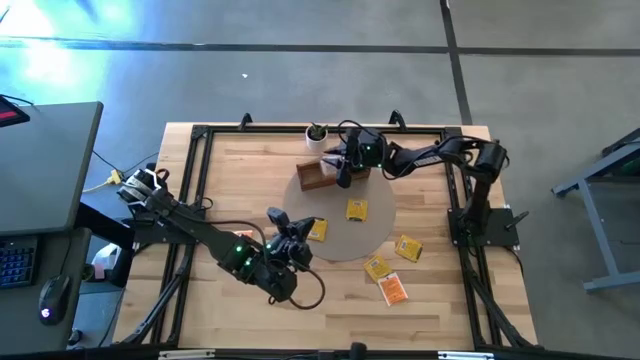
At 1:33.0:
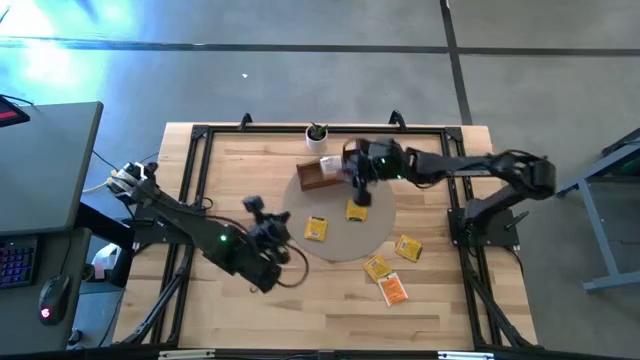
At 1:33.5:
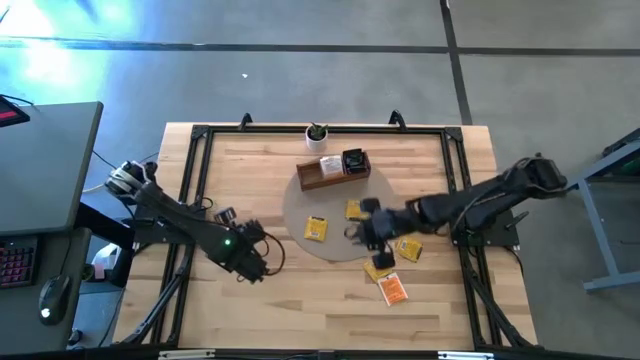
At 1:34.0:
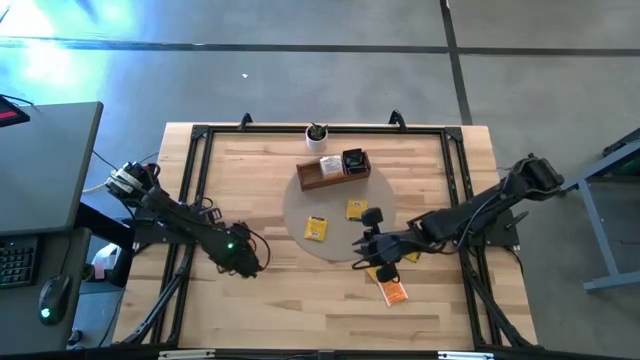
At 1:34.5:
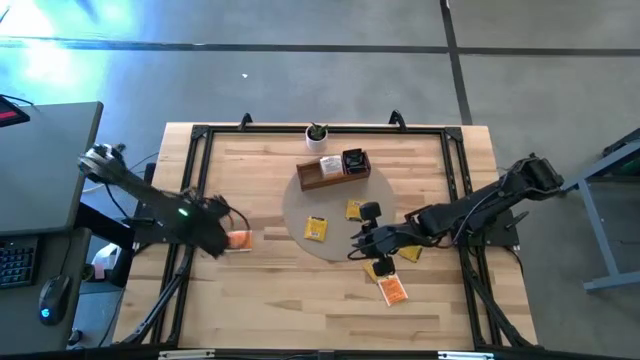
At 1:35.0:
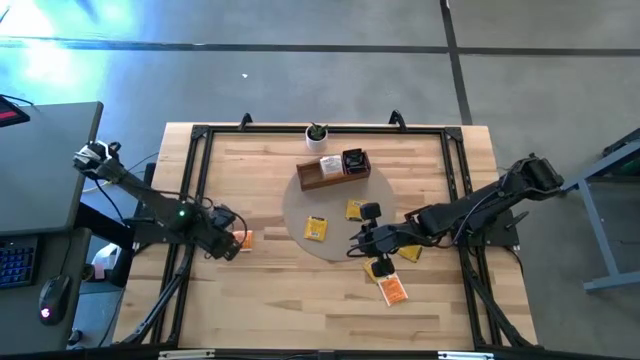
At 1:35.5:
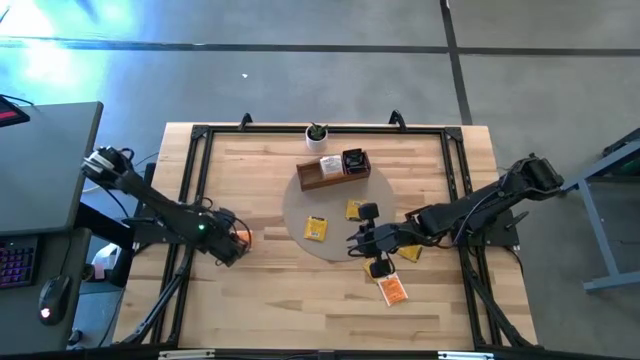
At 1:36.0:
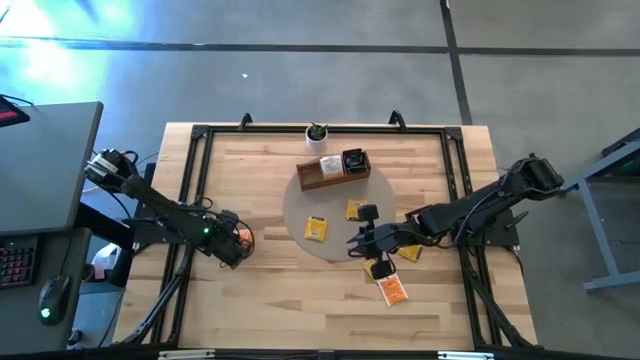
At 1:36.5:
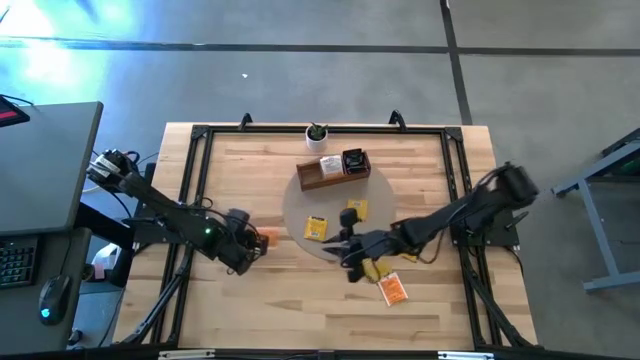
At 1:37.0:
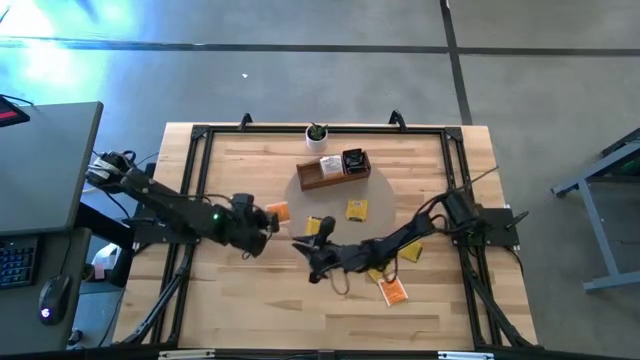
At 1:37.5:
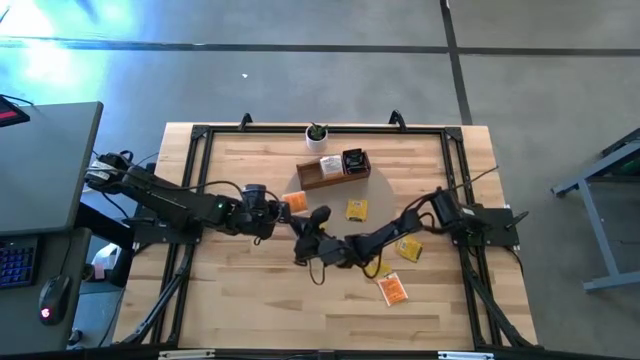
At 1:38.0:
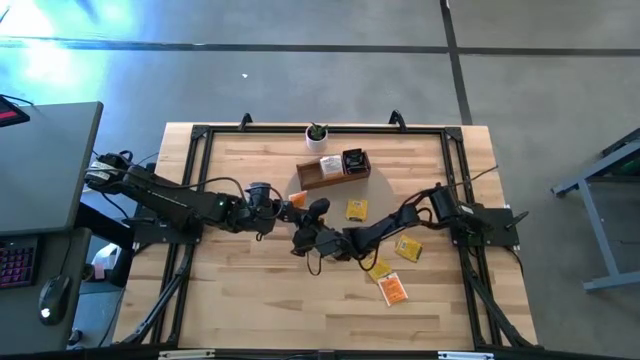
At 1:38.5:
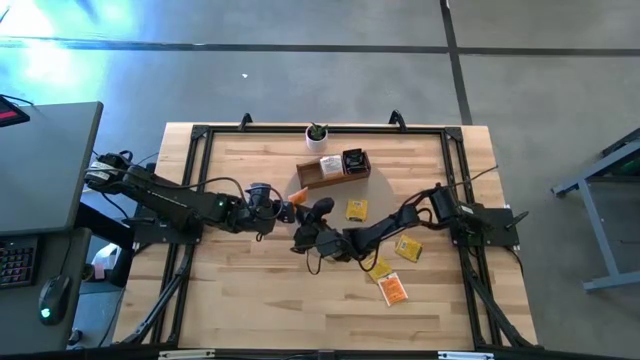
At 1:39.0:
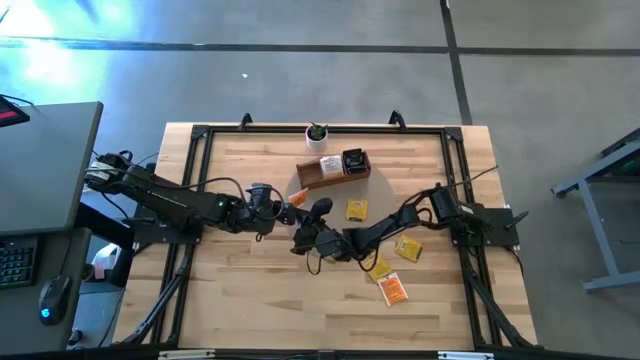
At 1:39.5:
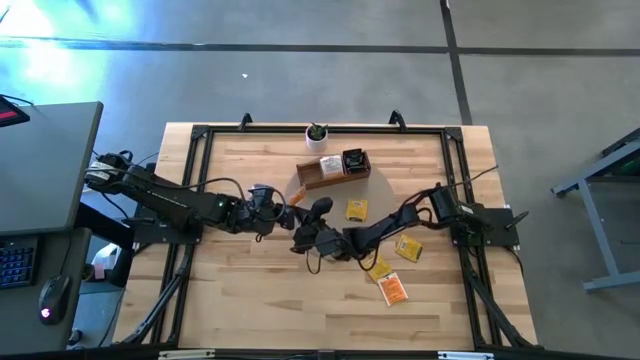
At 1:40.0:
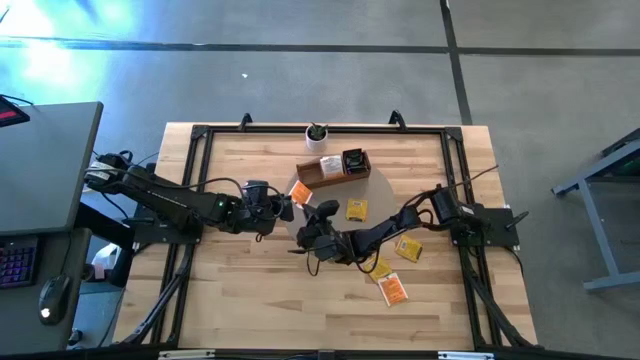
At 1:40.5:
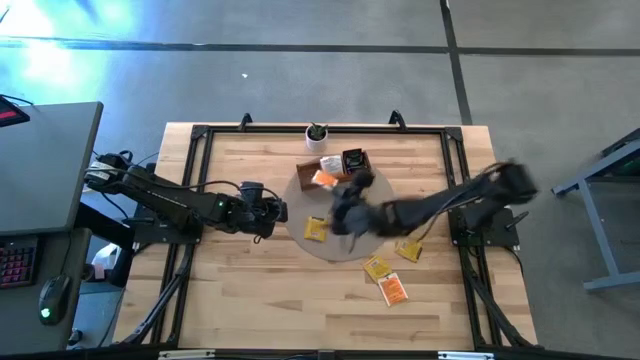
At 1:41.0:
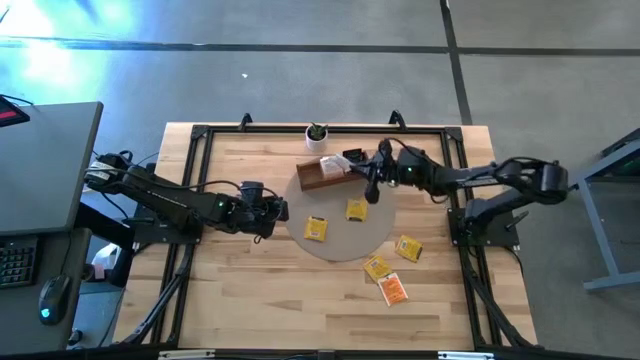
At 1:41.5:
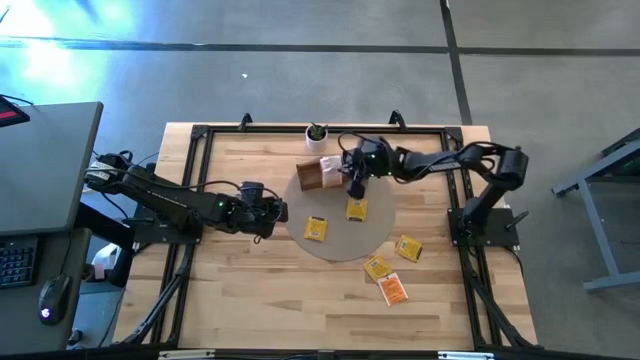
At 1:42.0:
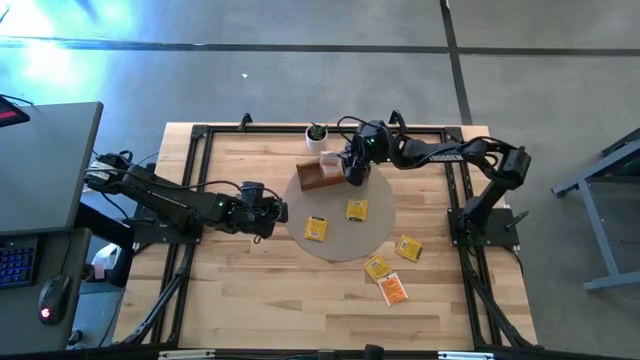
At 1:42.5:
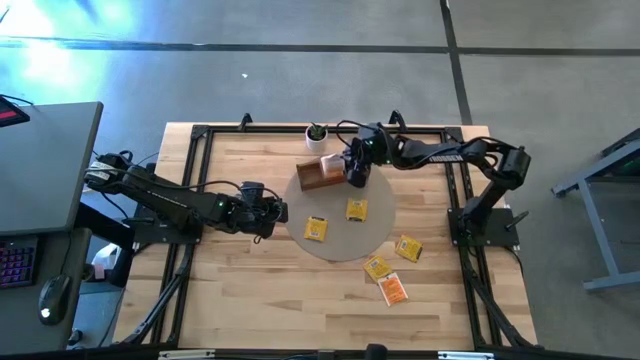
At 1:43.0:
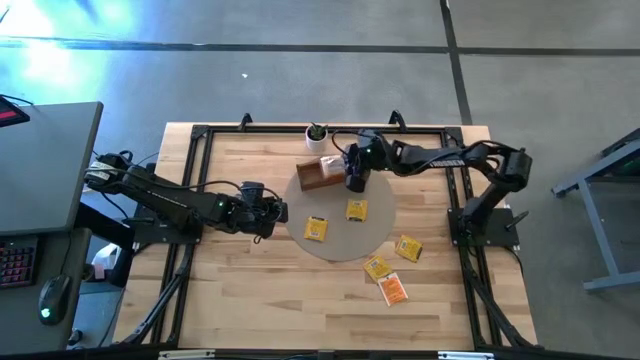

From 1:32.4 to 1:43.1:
Task: Pick & Place Tea
Put the top orange tea bag into the middle section of the wooden organizer

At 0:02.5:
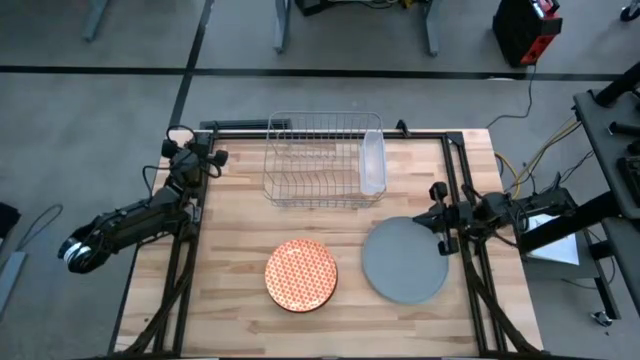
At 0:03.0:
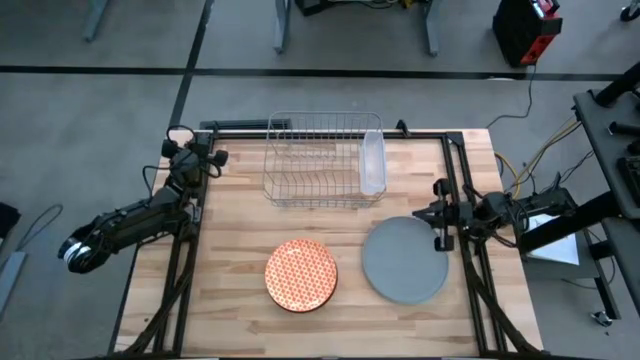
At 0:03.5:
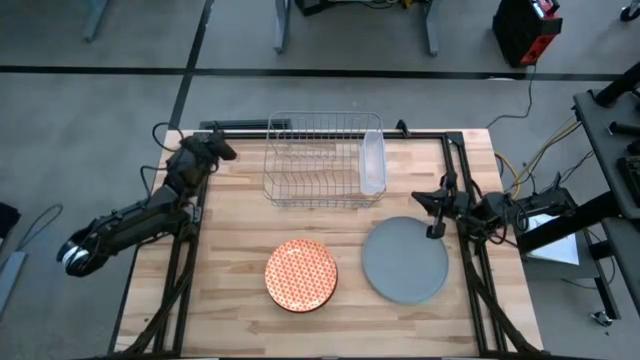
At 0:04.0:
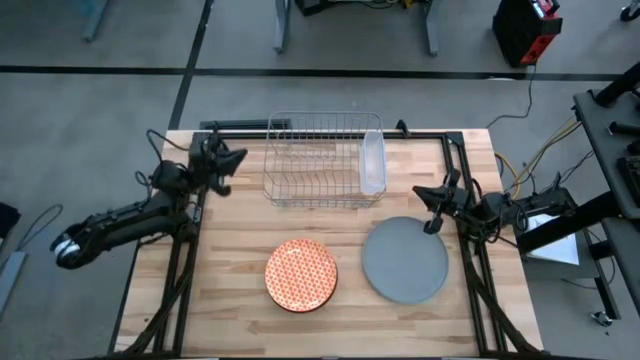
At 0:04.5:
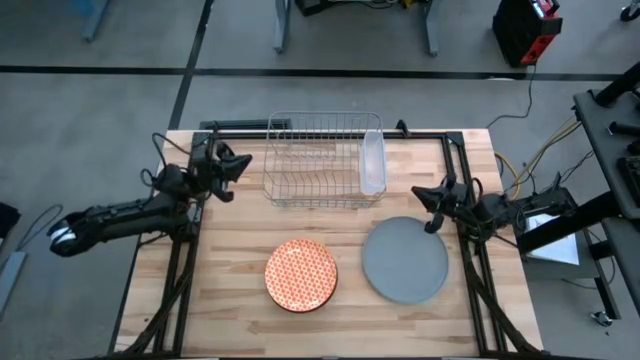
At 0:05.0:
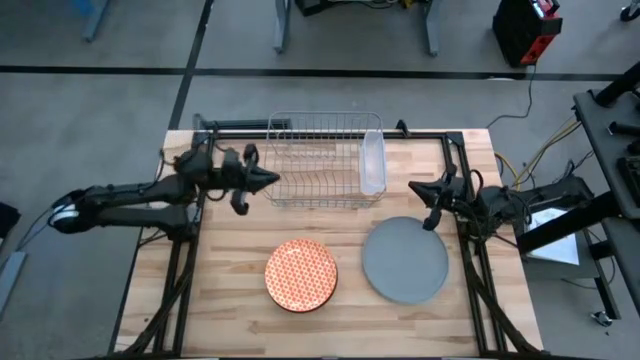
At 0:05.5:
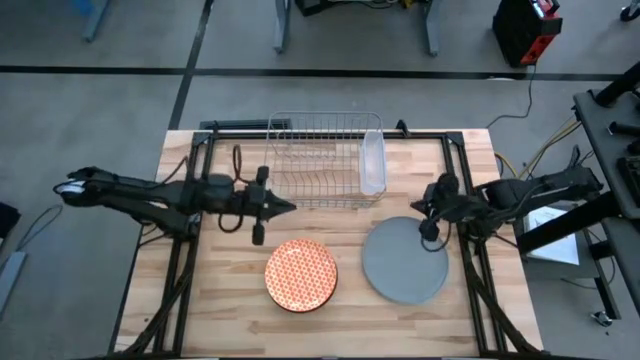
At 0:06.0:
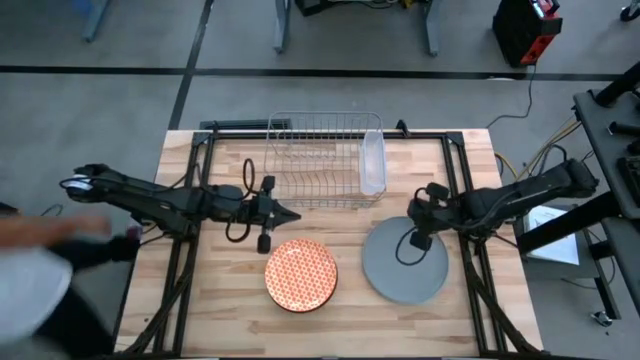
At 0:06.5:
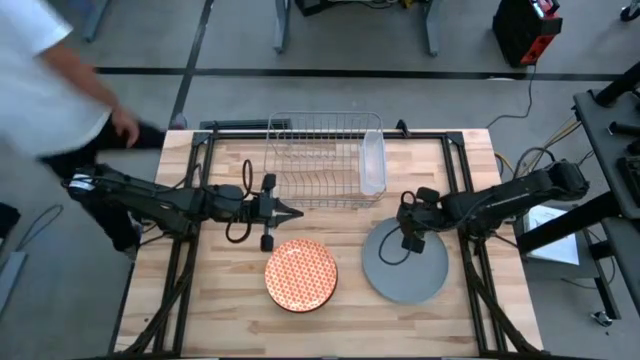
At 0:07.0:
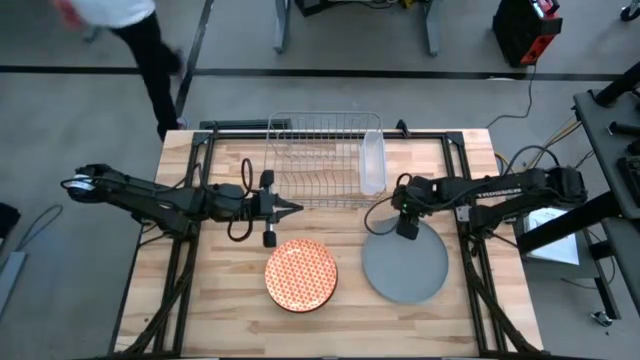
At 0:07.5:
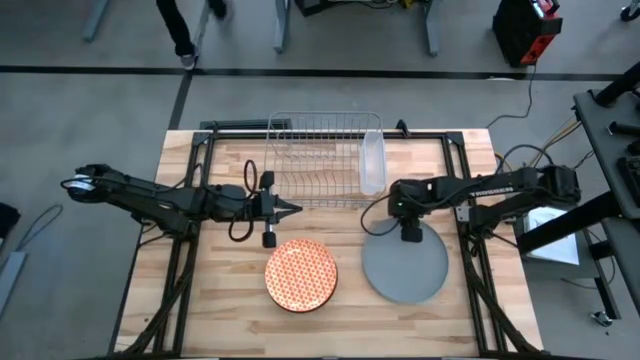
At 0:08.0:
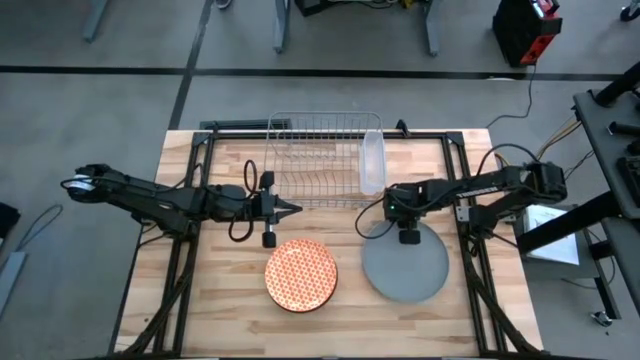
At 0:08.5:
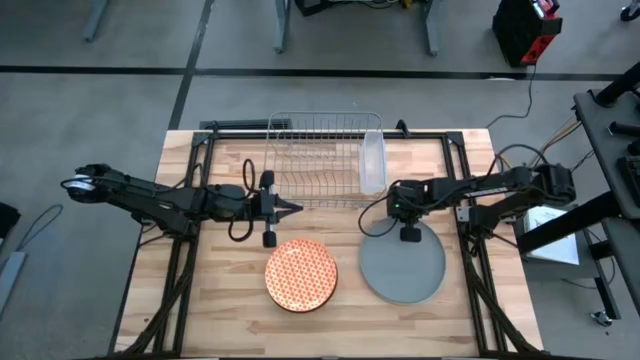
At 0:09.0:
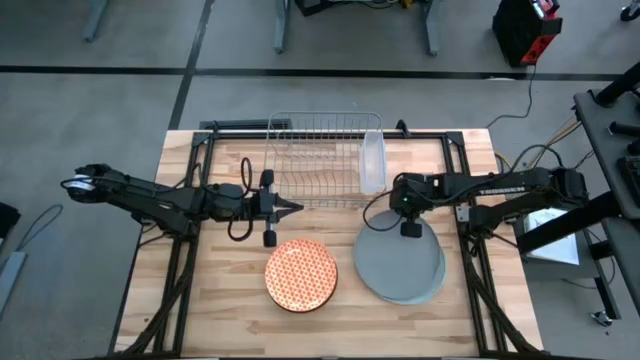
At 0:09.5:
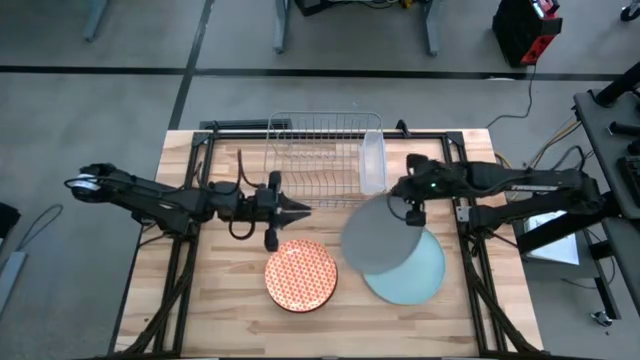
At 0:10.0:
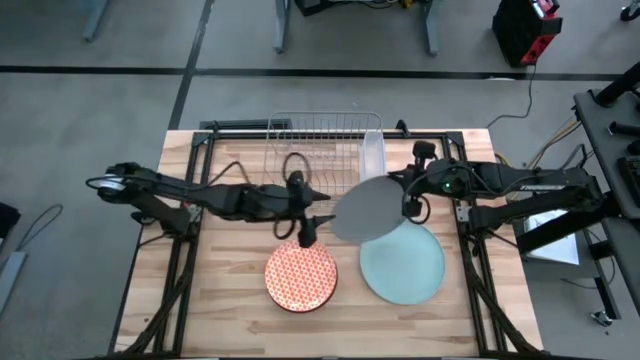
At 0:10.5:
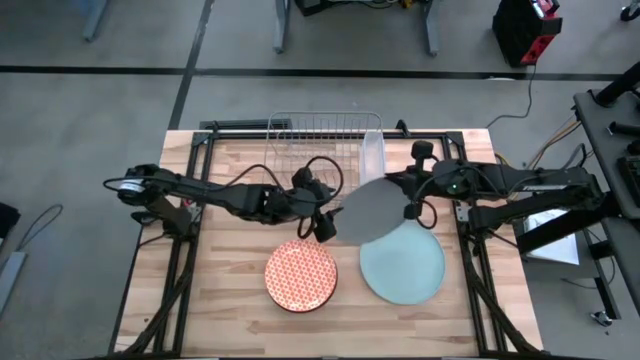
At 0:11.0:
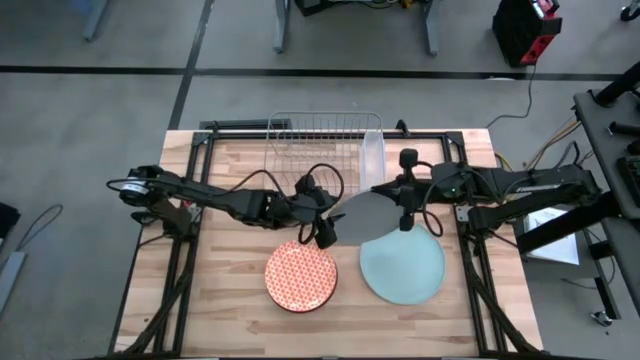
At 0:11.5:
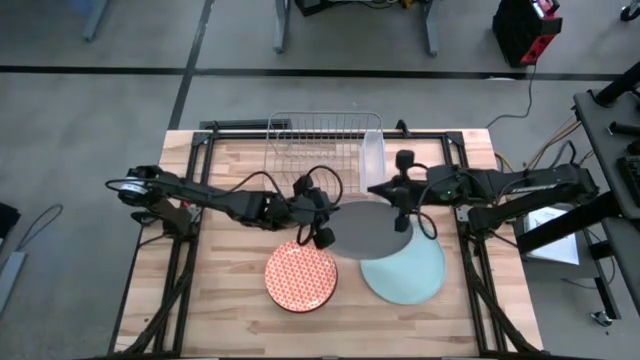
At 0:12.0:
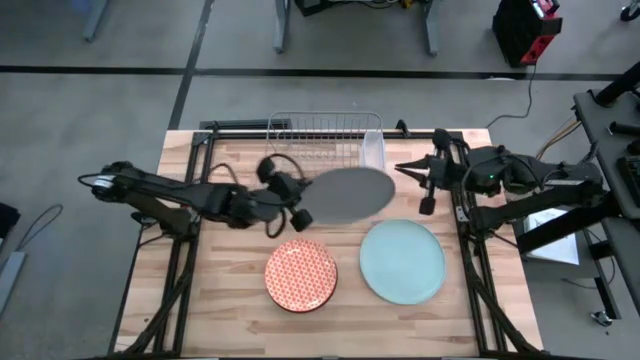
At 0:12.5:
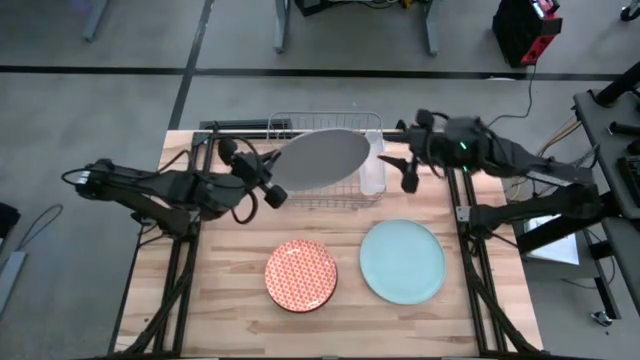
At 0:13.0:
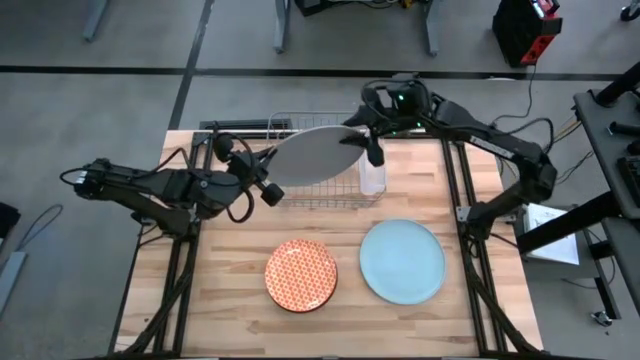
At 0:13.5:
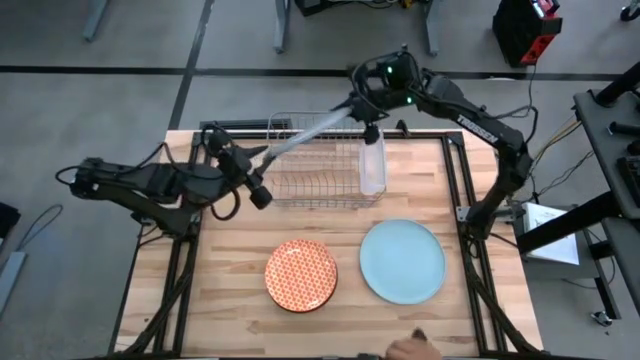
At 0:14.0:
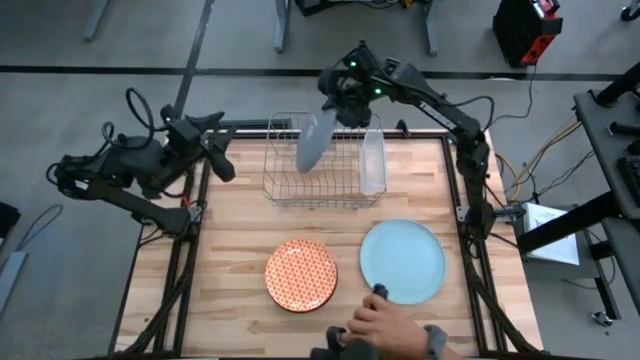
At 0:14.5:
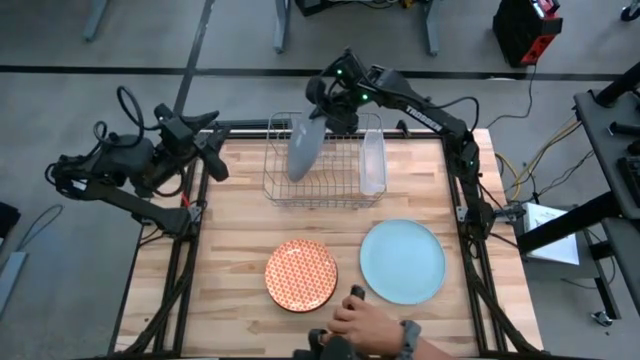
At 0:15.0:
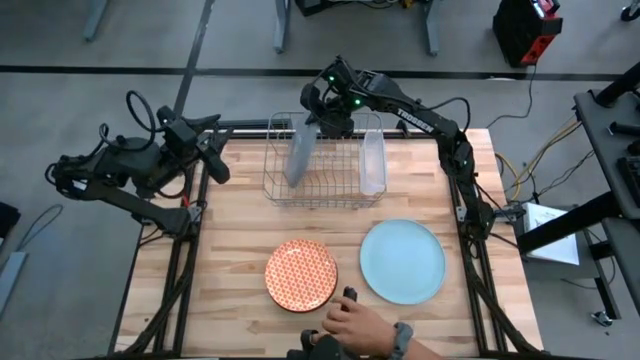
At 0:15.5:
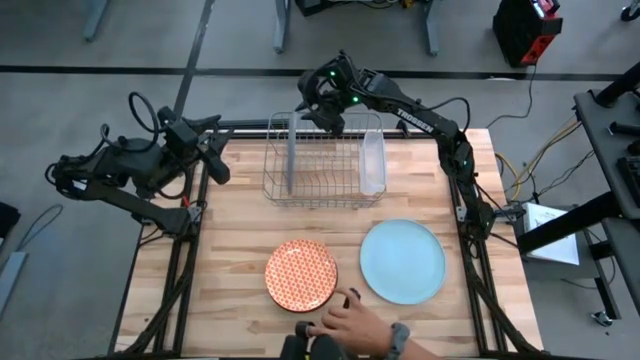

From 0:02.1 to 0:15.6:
Task: Sort dishes
Put the grey plate in the dish rack
